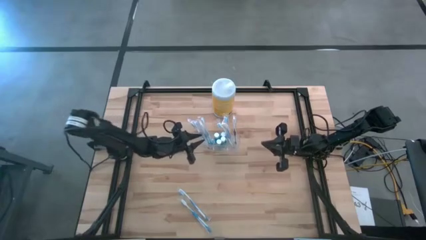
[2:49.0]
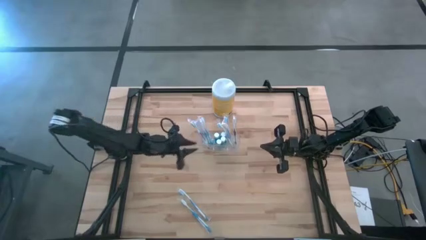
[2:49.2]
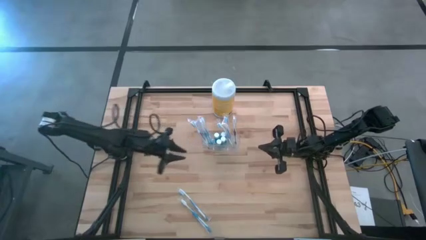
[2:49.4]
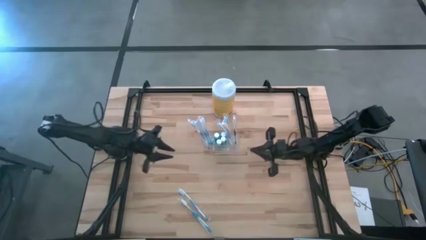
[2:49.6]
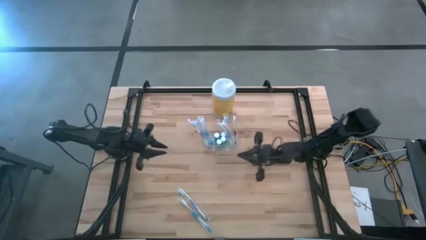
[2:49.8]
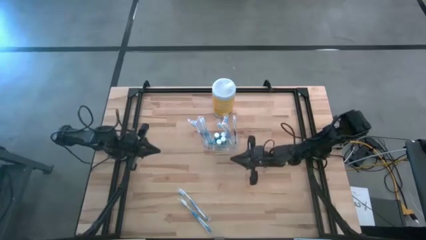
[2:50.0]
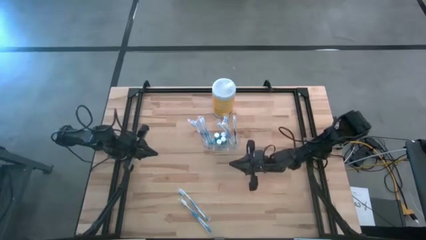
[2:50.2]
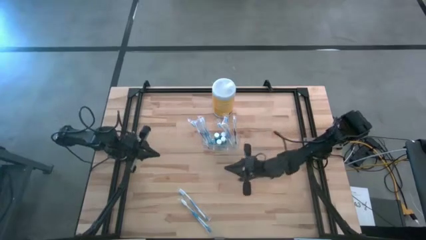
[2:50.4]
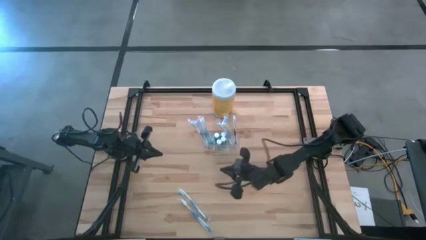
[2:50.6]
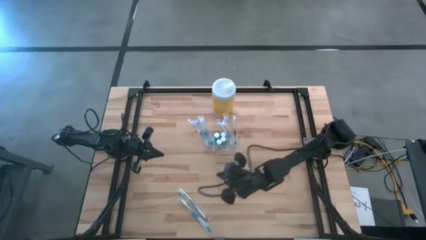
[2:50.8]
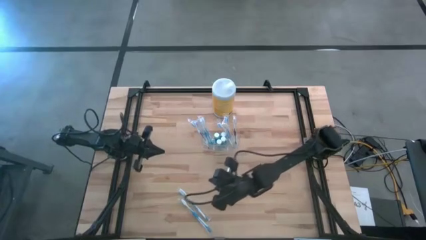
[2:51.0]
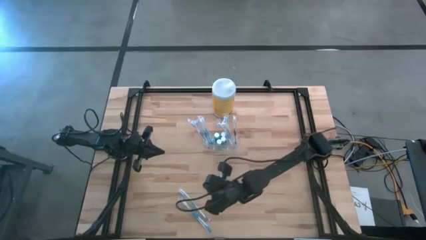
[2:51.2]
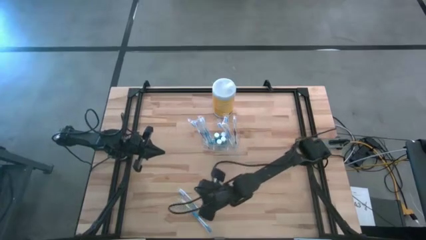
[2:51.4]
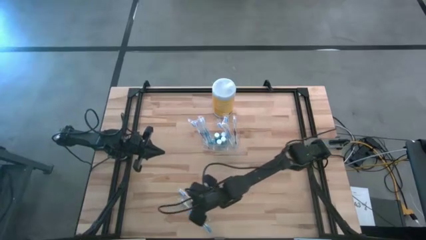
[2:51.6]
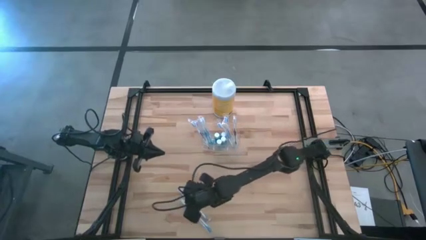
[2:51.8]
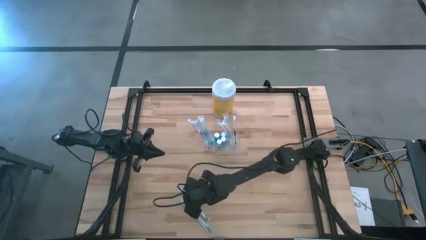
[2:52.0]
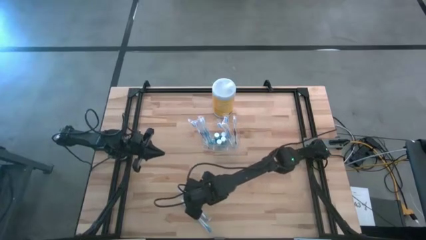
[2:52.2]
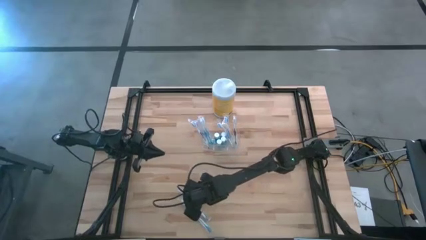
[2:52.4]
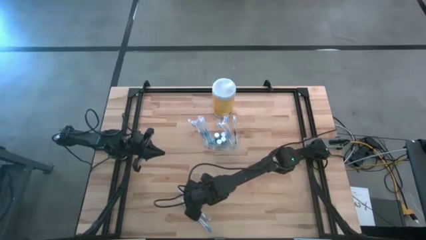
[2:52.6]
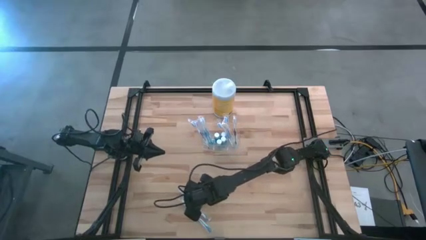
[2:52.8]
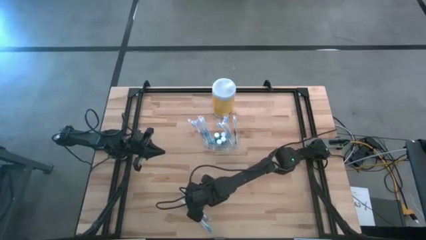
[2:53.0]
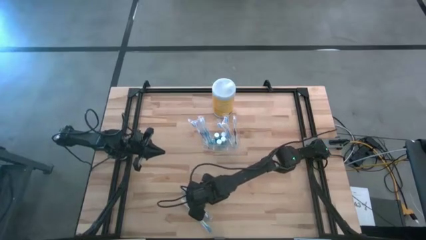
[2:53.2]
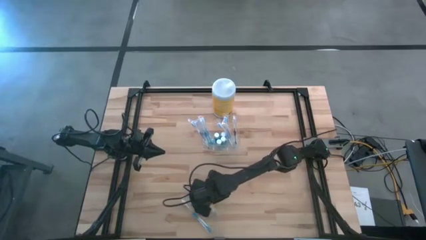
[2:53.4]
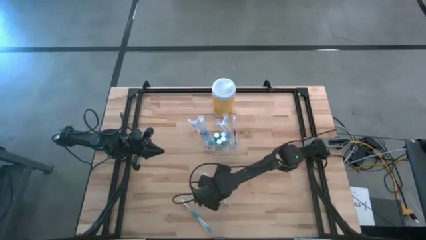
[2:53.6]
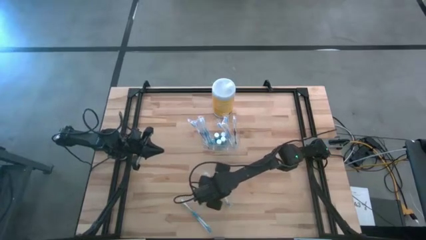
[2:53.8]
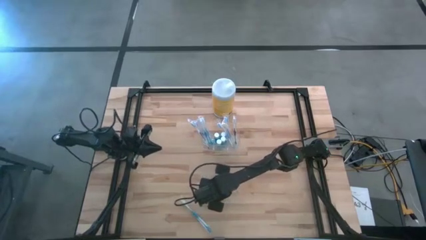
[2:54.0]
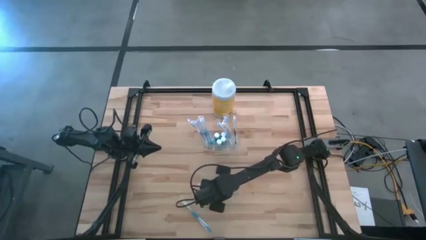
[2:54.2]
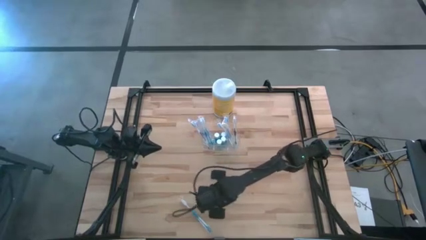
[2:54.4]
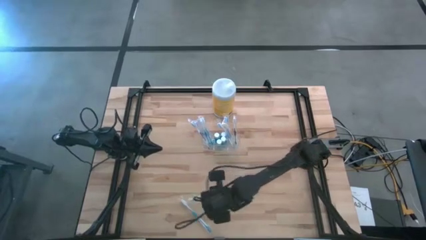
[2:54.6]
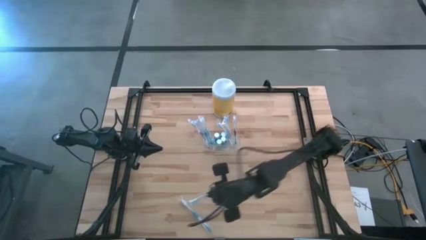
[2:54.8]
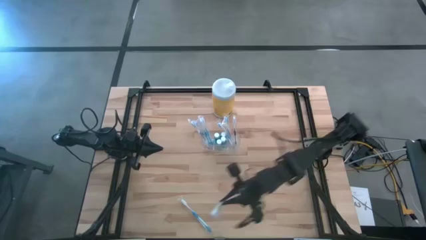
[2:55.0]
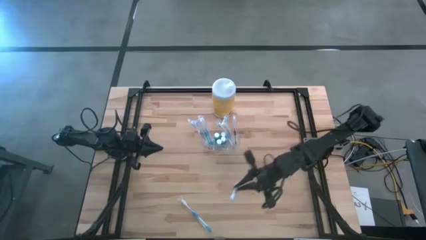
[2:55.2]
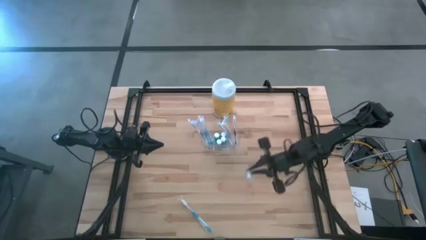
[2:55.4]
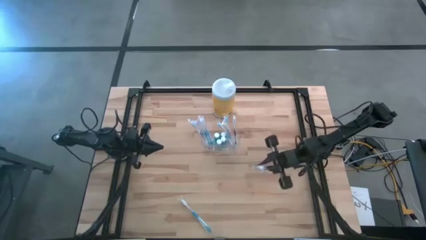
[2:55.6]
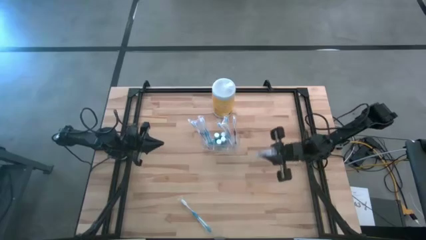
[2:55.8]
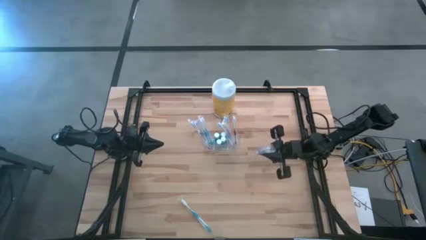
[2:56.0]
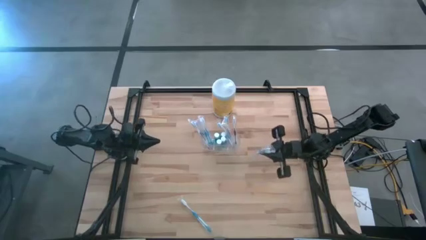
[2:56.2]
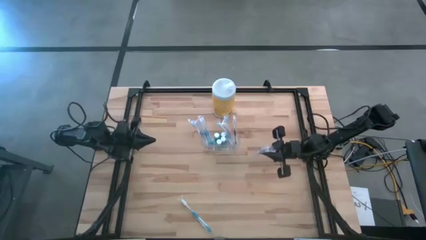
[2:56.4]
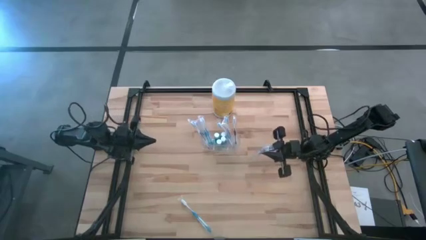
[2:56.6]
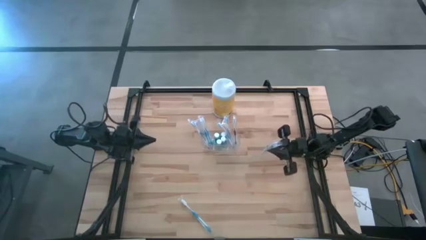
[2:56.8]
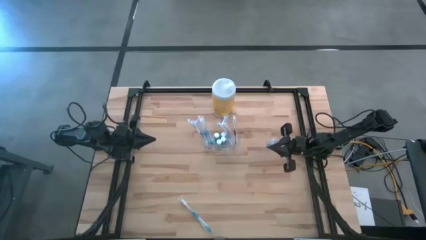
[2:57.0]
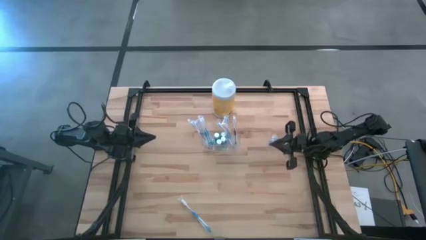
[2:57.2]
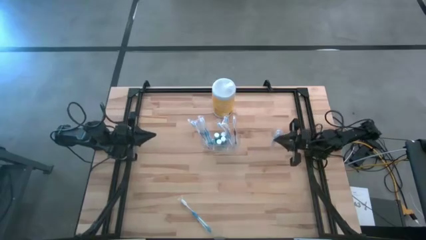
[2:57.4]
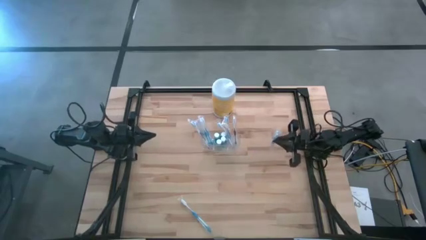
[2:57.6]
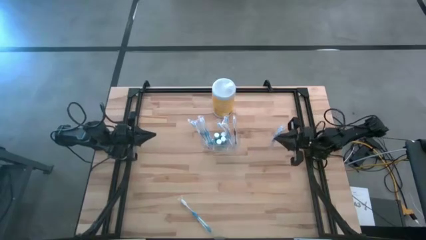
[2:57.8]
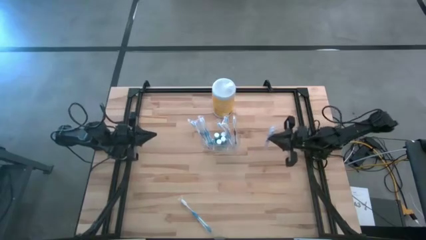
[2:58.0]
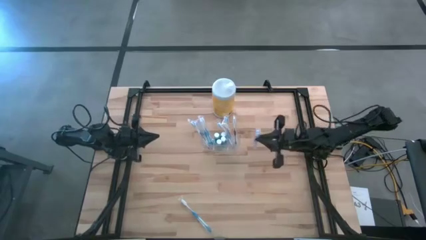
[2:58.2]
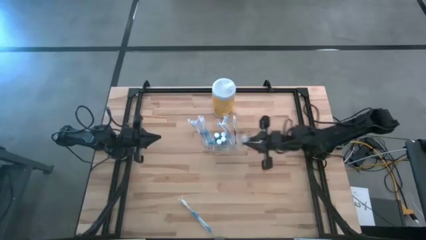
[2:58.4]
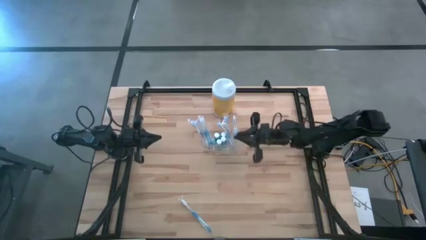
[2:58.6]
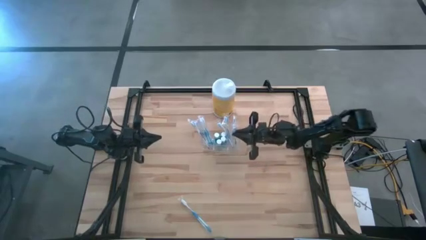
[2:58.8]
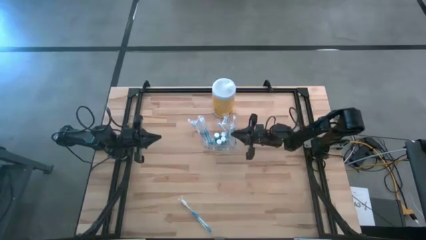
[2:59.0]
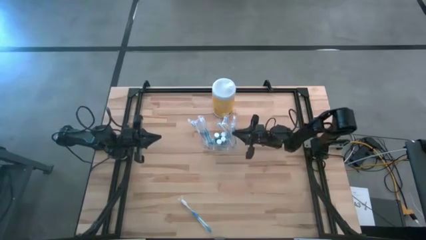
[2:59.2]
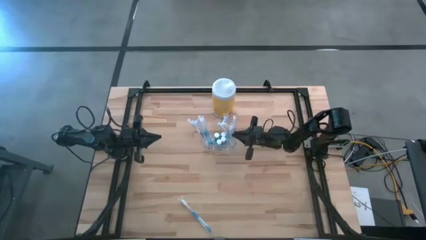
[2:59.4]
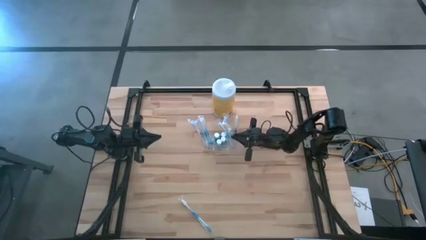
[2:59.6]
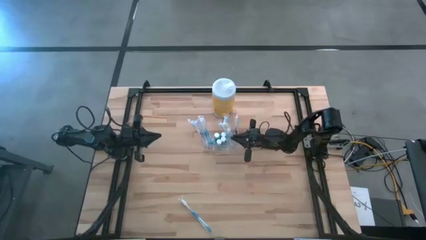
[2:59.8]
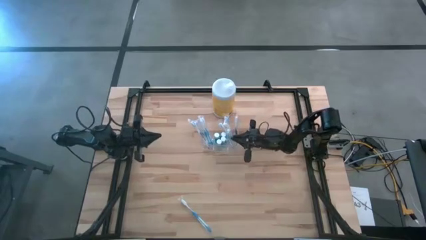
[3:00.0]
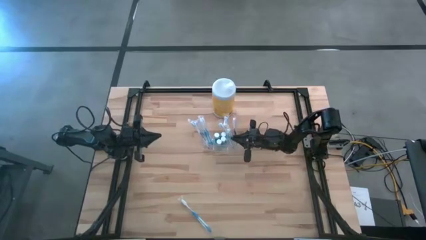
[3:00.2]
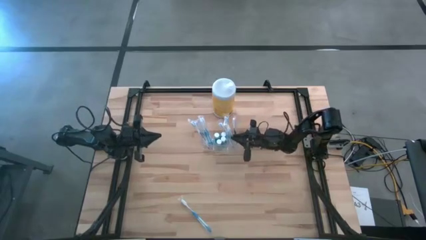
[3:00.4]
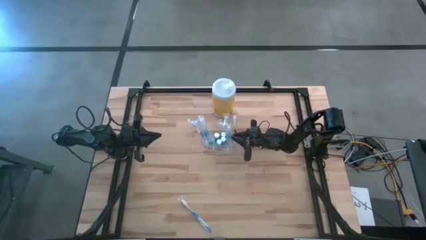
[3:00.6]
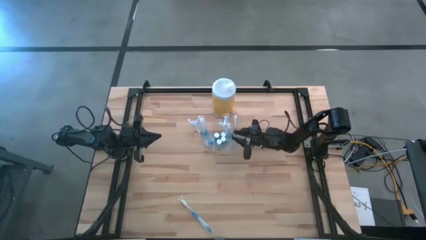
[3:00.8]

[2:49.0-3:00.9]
Task: Pick & Place toothbrushing station
Put the blue toothbrush into the transparent organizer

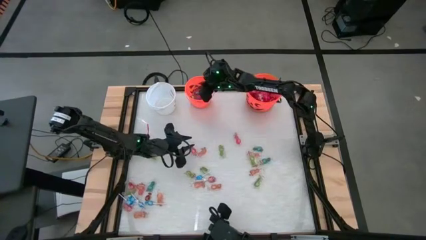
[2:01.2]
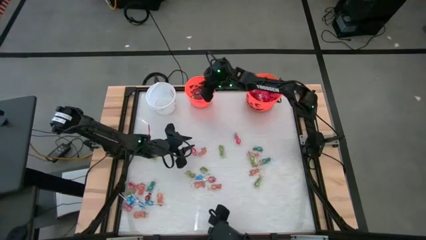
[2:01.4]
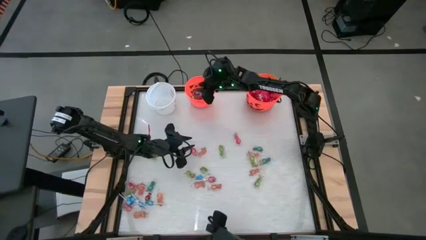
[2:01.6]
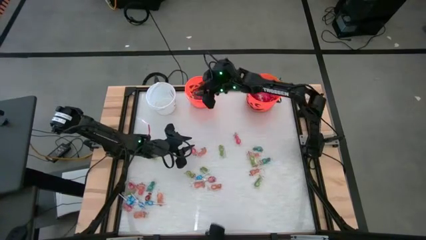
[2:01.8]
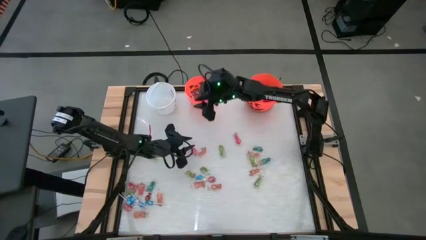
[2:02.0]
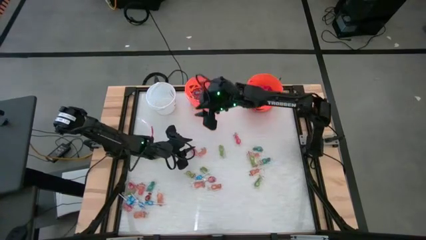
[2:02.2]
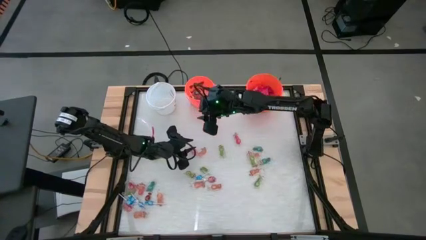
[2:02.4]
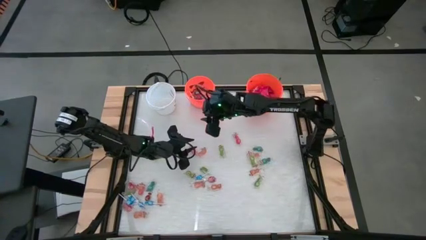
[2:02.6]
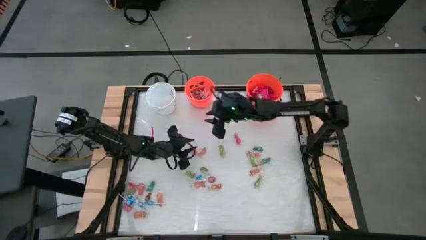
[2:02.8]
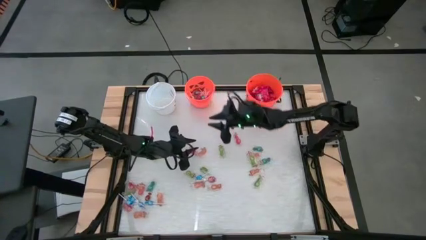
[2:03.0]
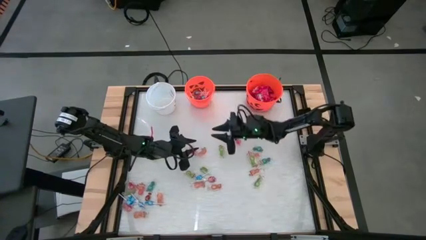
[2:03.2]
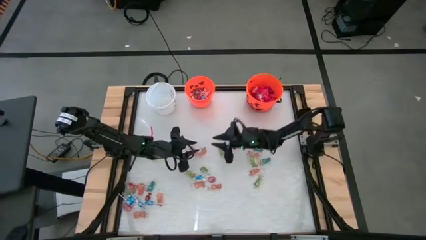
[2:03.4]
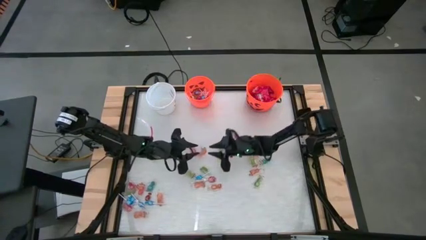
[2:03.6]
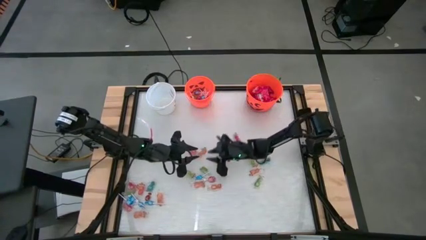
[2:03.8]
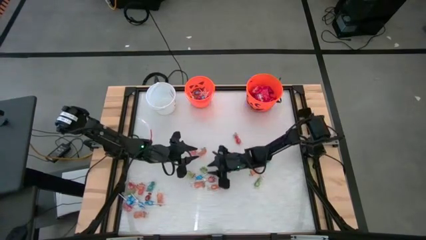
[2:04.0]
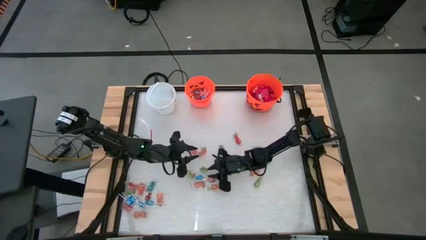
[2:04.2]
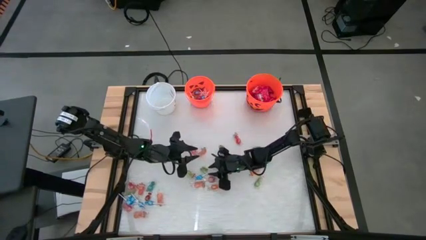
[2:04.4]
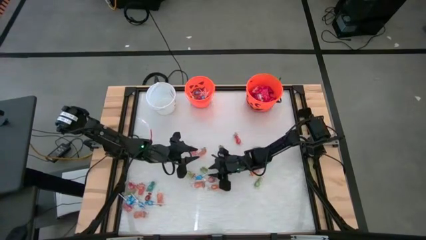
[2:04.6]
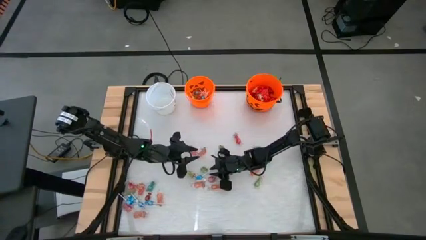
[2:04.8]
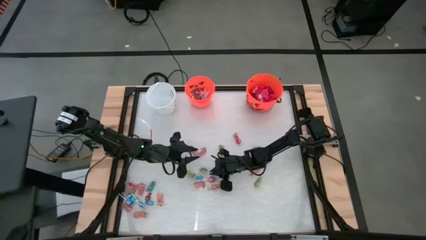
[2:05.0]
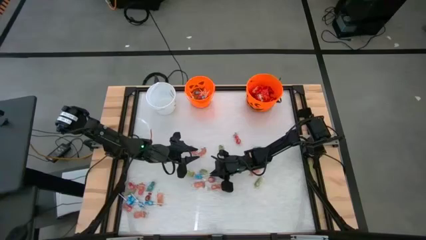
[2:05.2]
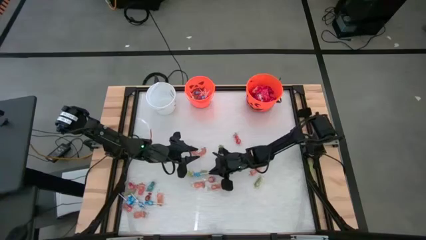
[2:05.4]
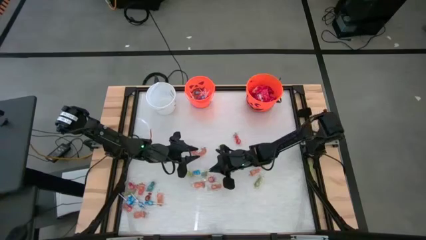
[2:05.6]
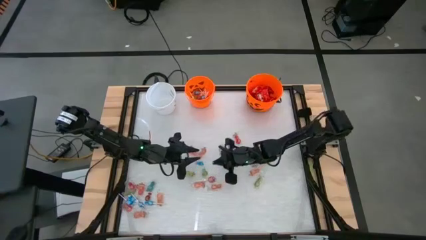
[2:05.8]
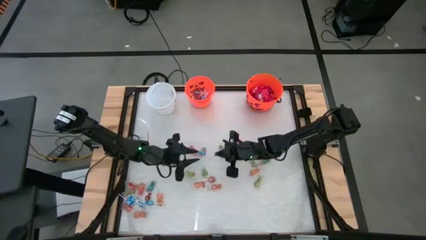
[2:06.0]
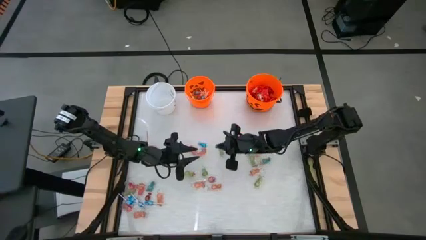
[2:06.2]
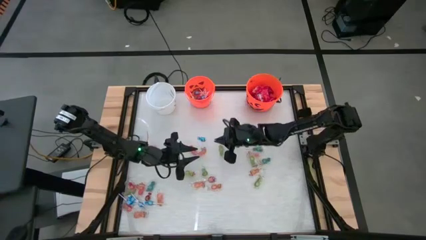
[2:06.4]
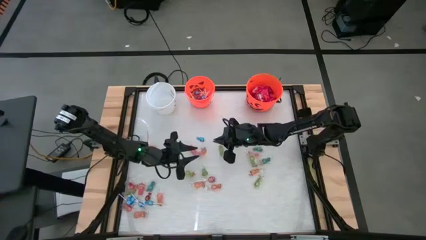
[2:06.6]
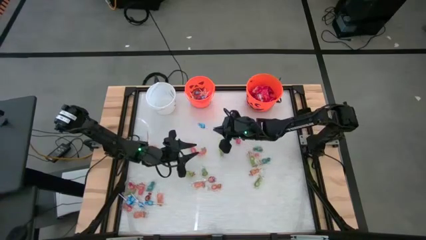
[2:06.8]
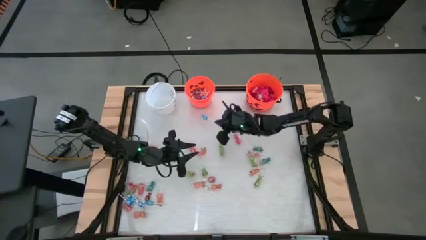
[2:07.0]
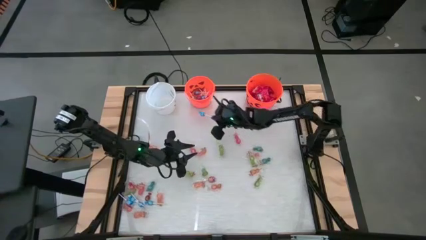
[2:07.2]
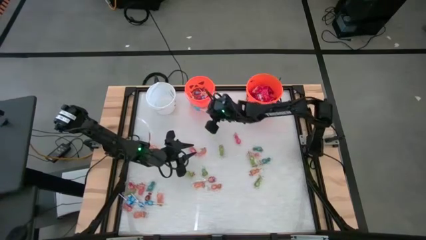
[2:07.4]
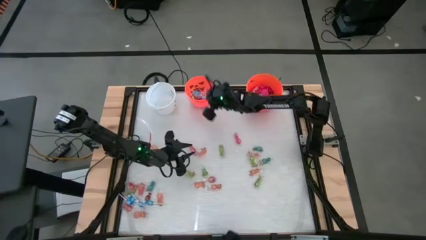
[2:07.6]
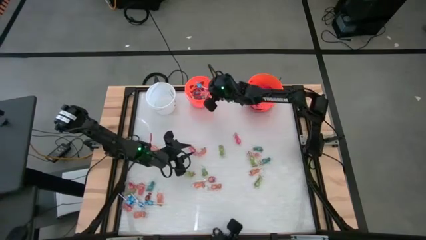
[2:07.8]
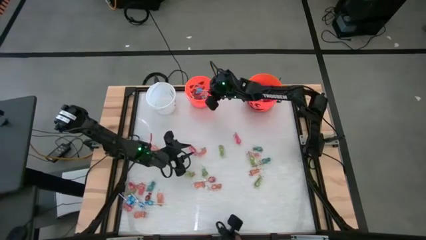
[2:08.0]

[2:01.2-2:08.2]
Task: Sort candy by brand, put in halloween buckets
Put the blue lollipop into the left orange bucket
